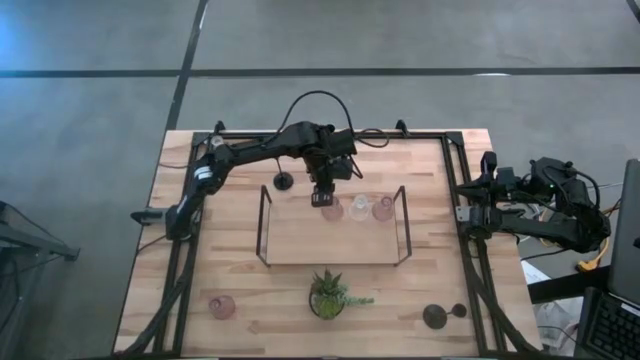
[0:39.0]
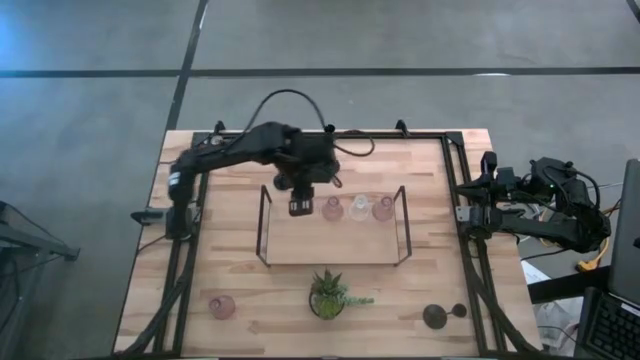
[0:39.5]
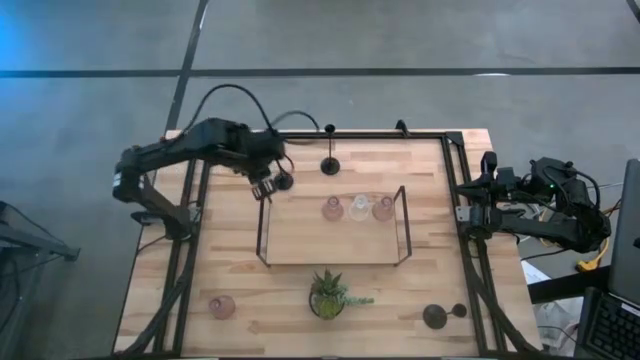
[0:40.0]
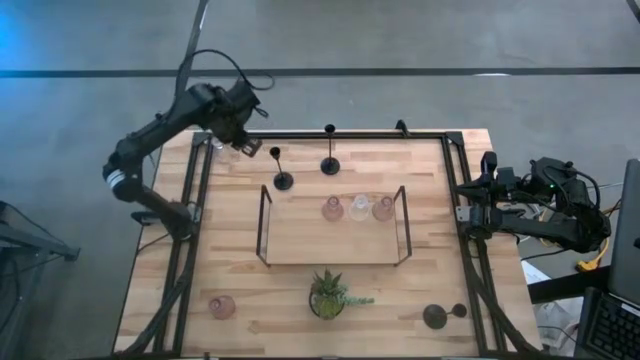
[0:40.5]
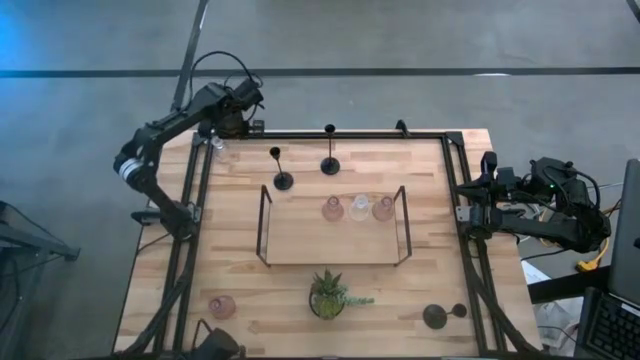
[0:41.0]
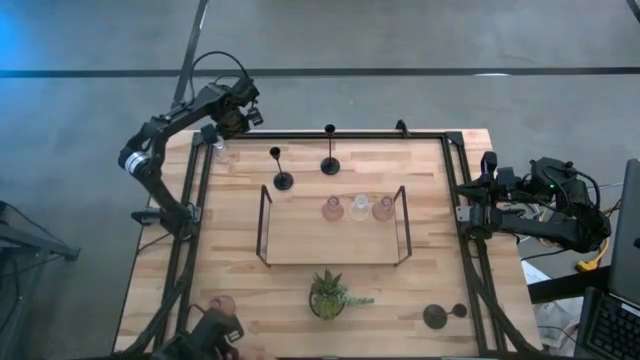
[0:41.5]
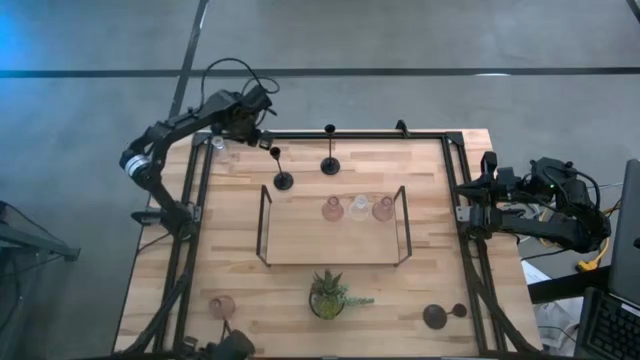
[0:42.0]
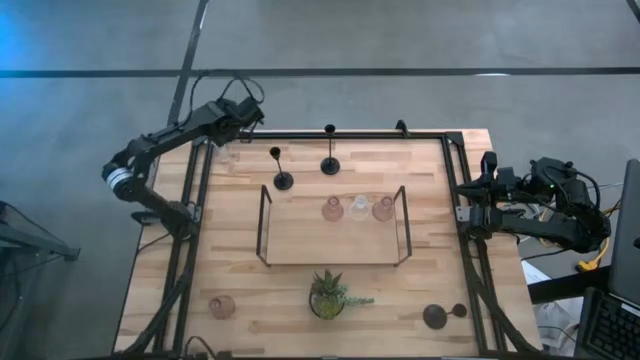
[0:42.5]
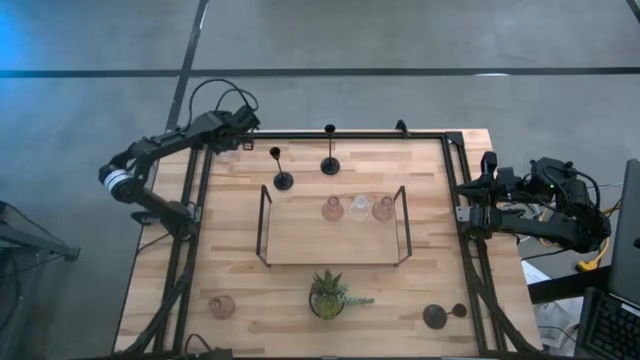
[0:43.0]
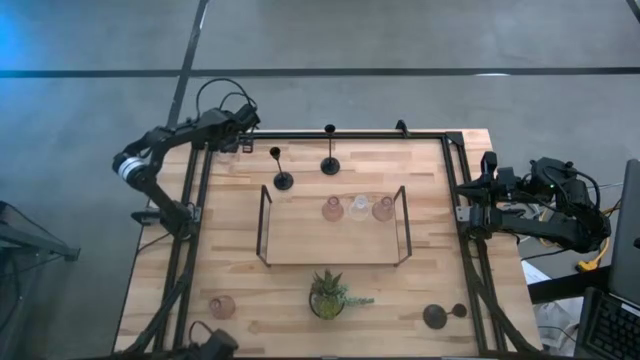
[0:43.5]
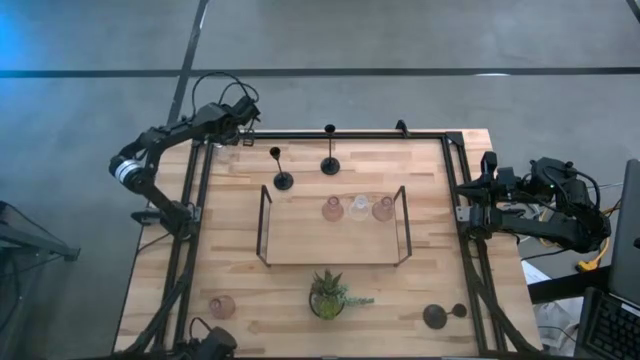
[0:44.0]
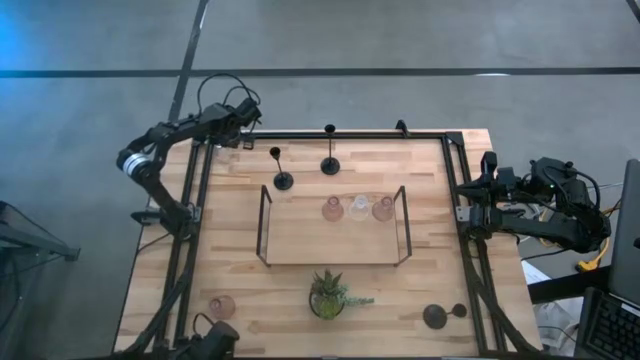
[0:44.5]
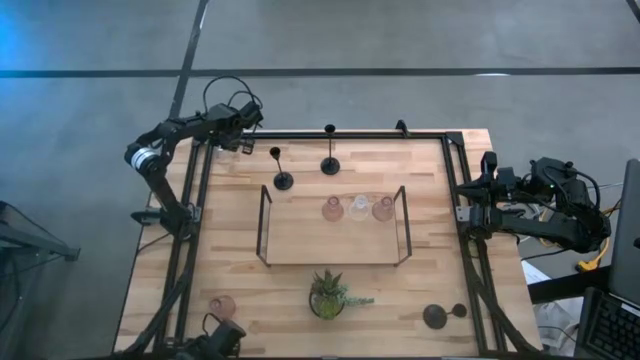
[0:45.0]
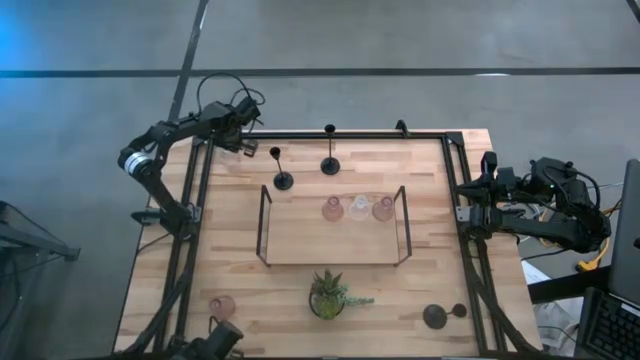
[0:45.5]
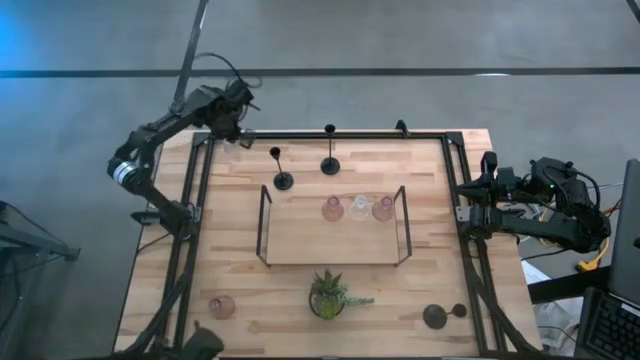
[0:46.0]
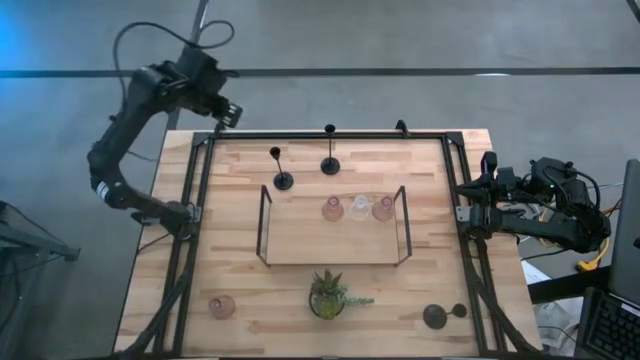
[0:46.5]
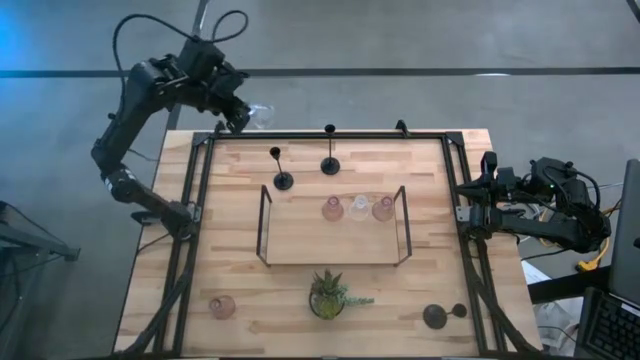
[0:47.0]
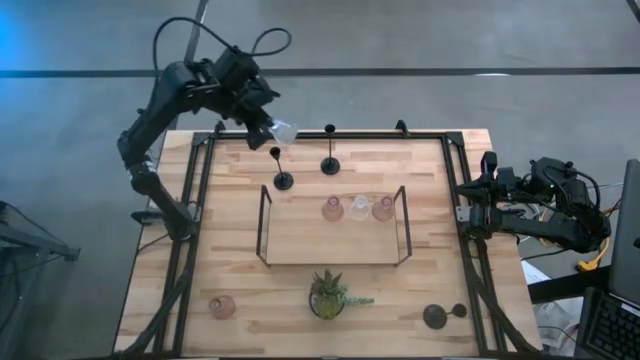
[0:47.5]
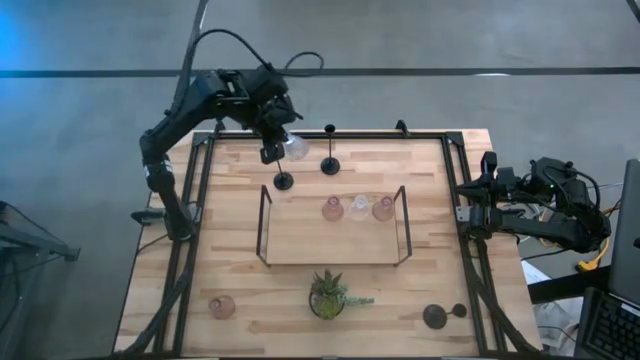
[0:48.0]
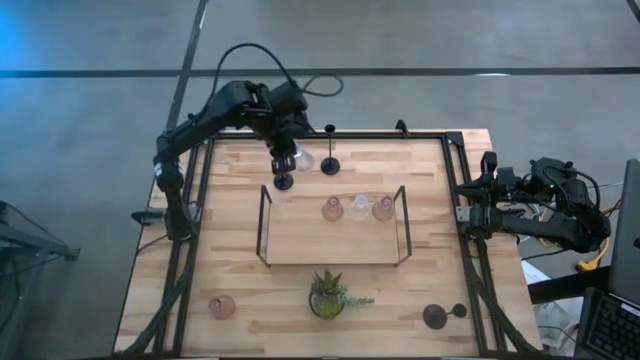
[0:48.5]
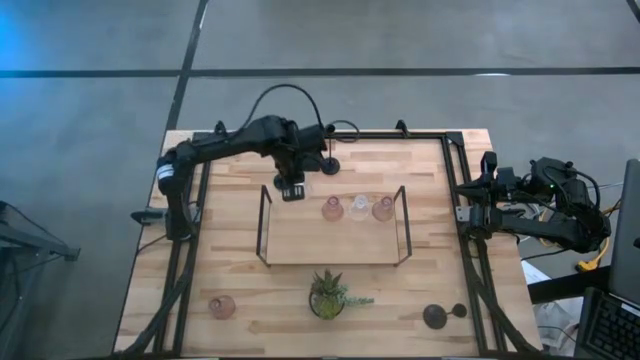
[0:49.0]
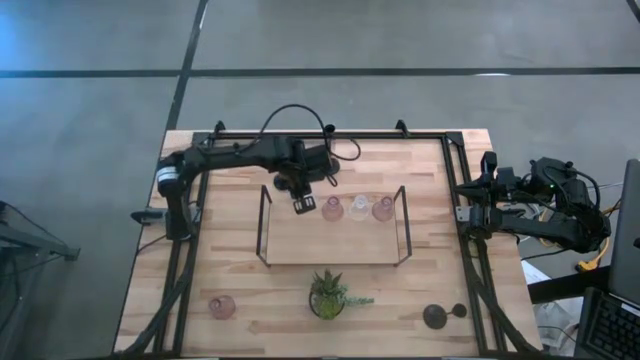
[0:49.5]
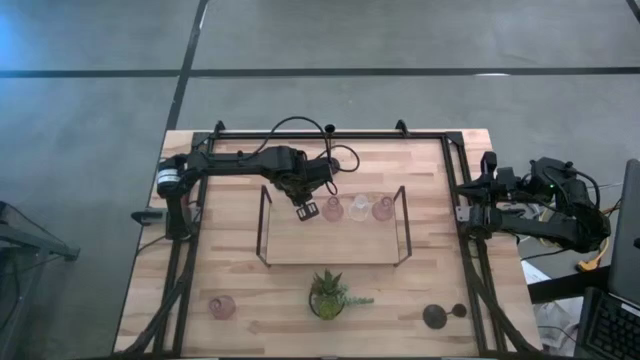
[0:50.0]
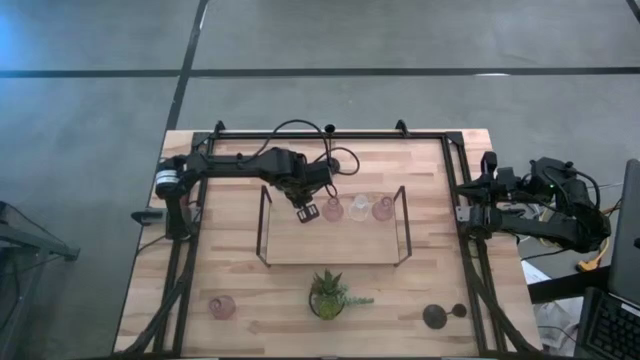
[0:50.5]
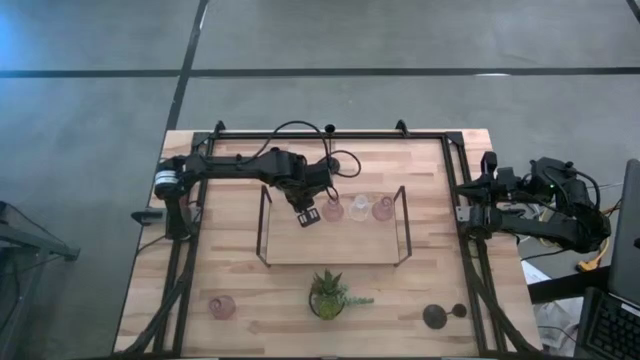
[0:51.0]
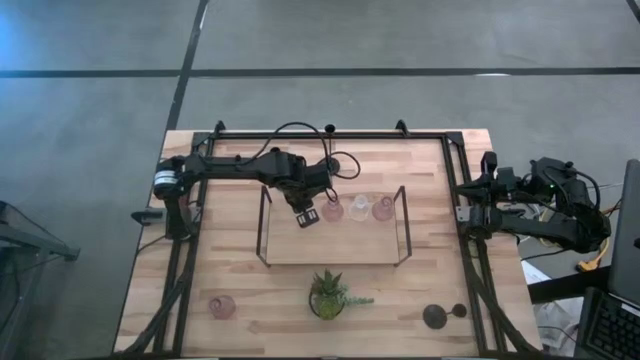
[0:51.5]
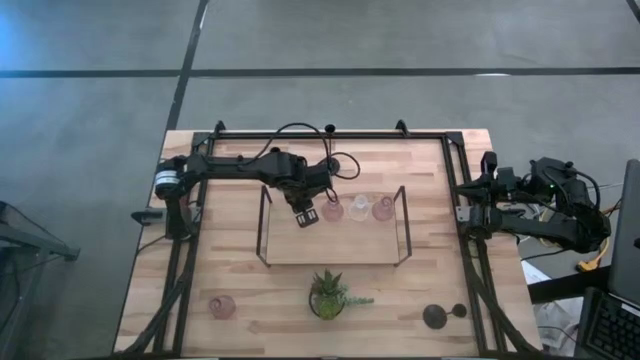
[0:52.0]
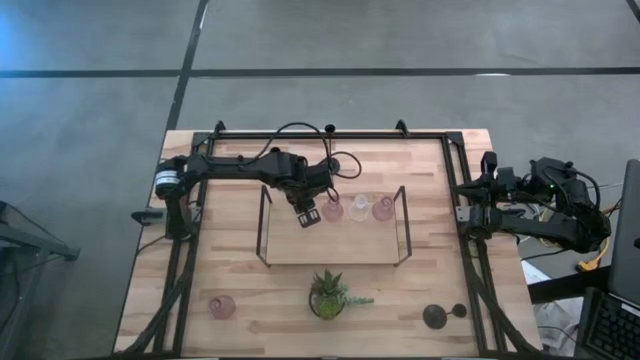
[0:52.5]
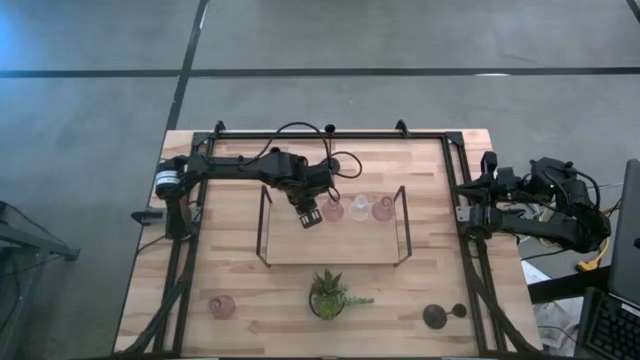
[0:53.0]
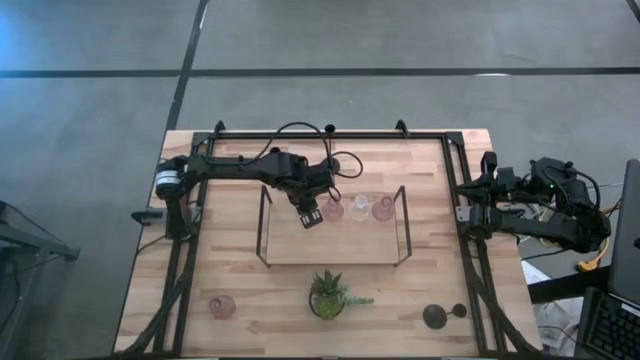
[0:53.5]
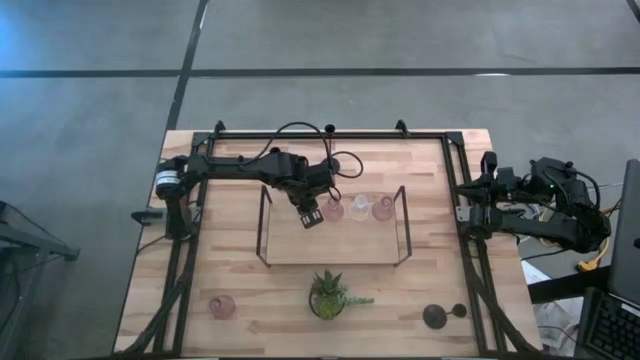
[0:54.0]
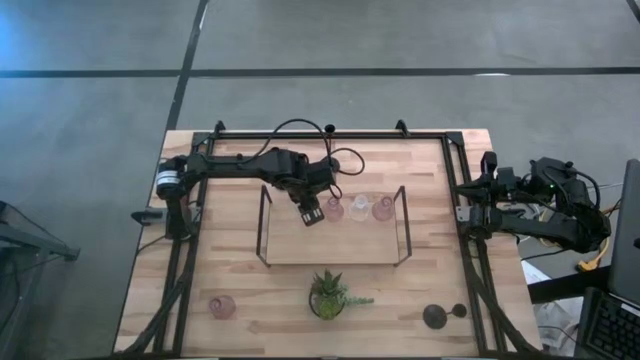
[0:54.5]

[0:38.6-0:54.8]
Task: Pick & Place candle stick holders
Put the transparent candle holder on the shelf

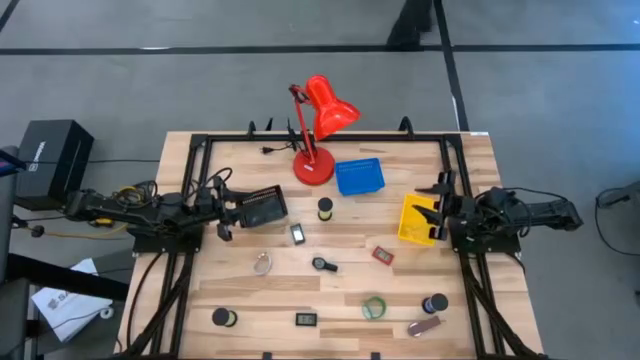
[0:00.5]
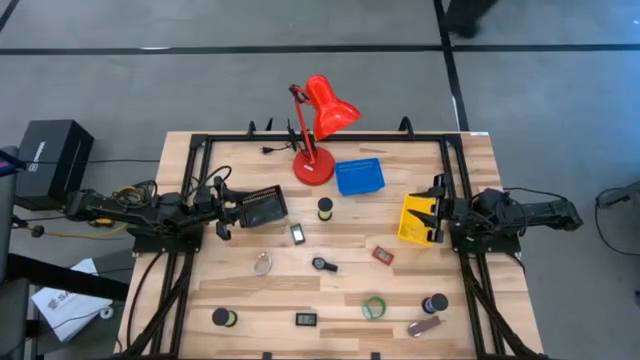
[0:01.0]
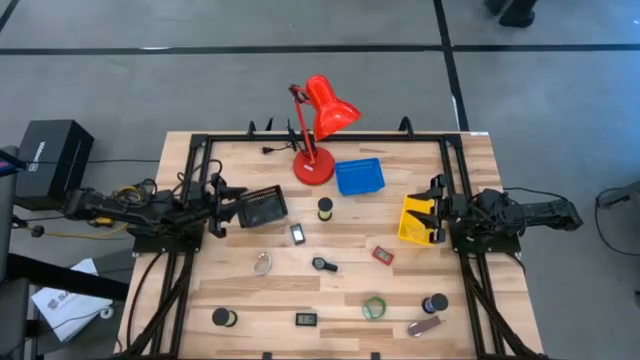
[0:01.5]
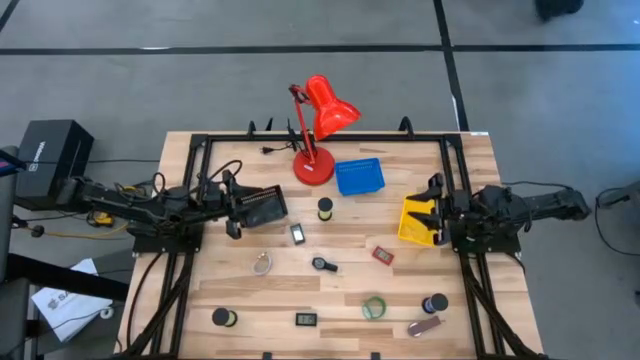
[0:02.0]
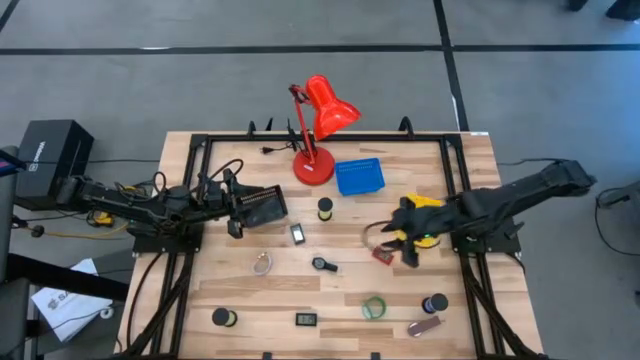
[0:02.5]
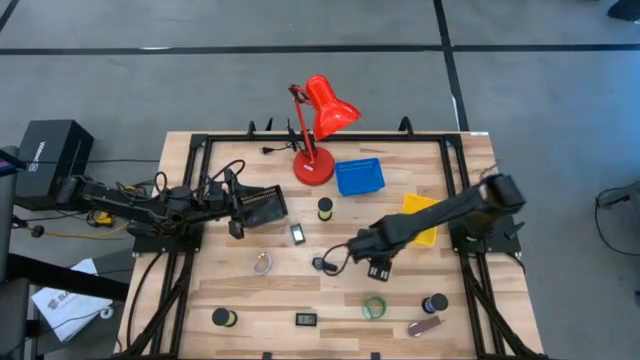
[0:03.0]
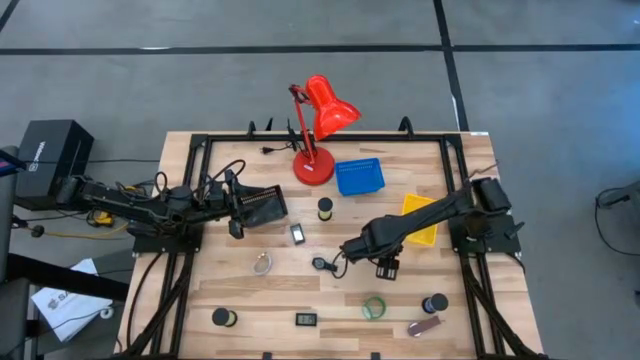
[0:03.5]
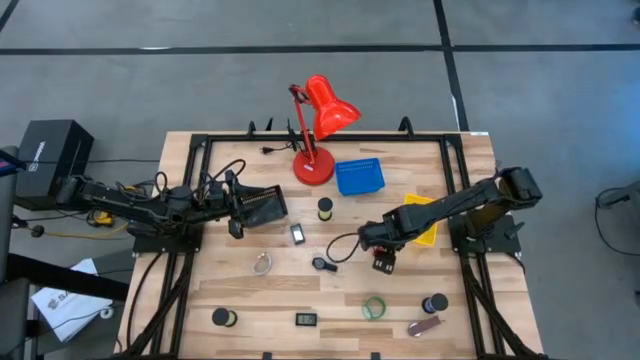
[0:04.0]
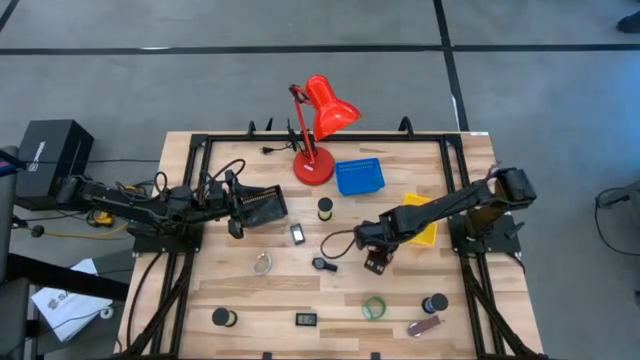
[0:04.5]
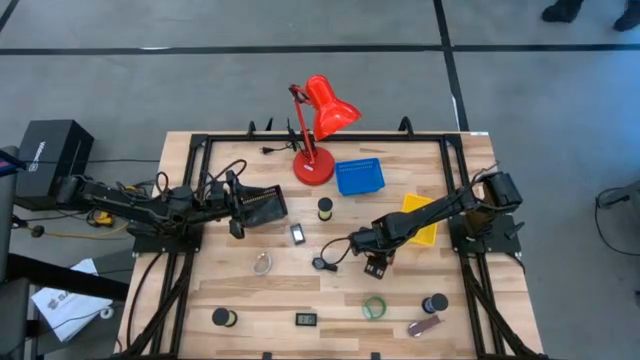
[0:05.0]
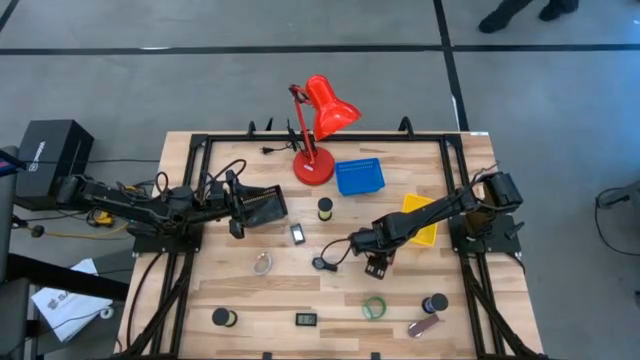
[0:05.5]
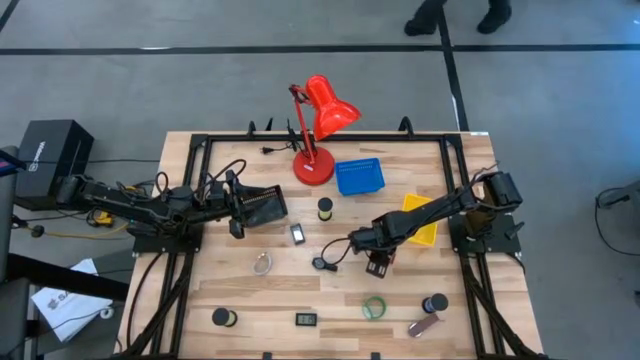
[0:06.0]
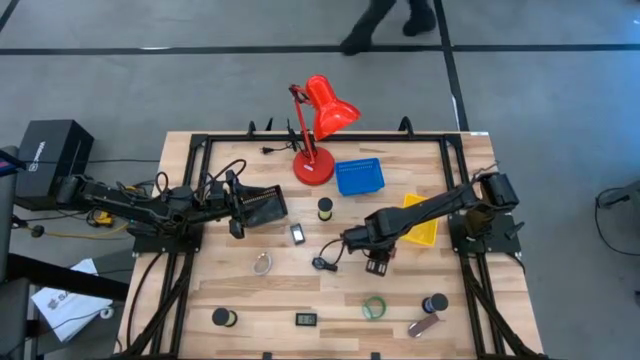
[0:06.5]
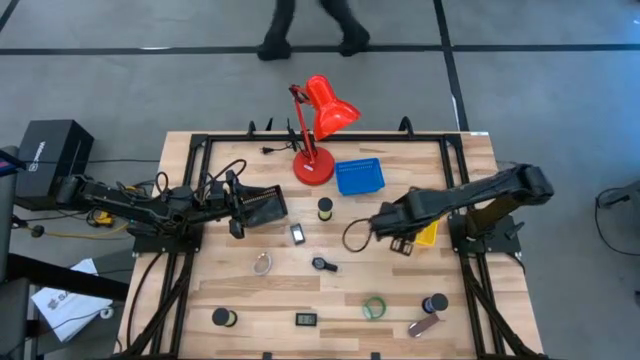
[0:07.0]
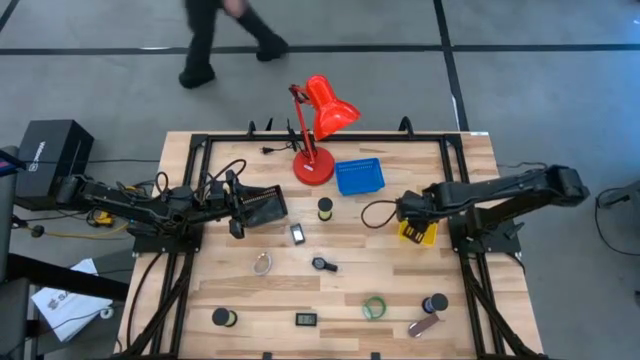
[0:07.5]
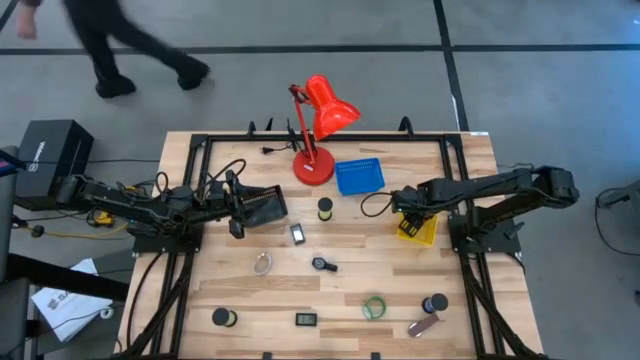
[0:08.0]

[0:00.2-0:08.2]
Task: Pick & Place Office items
Put the red digital clock into the yellow basket
